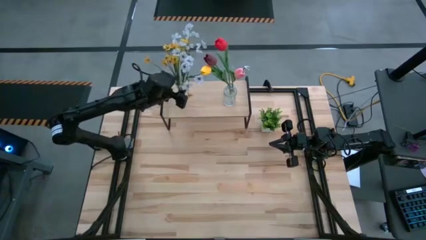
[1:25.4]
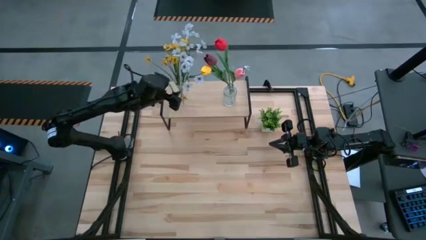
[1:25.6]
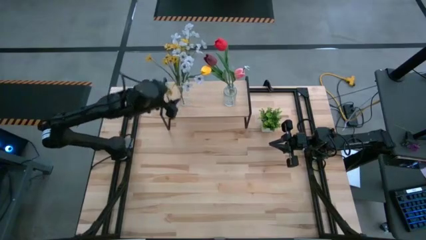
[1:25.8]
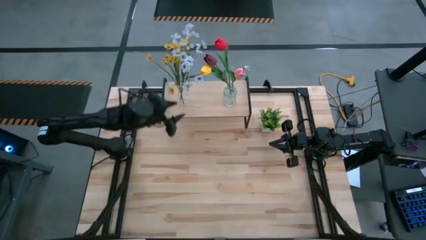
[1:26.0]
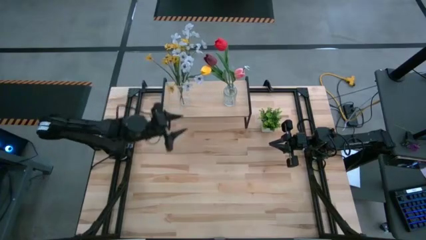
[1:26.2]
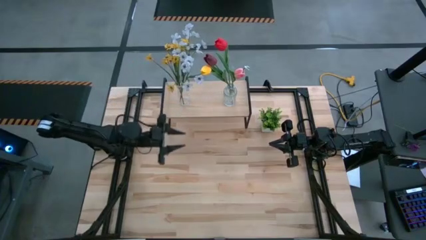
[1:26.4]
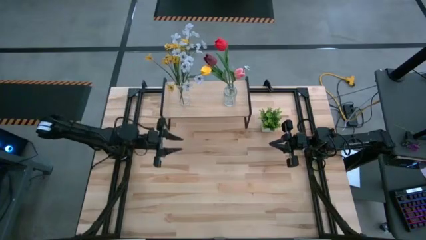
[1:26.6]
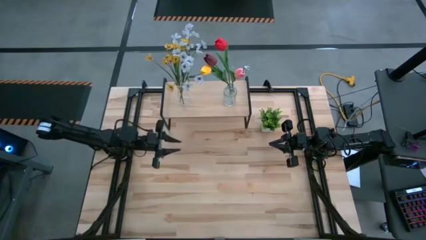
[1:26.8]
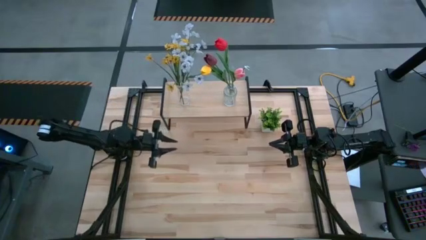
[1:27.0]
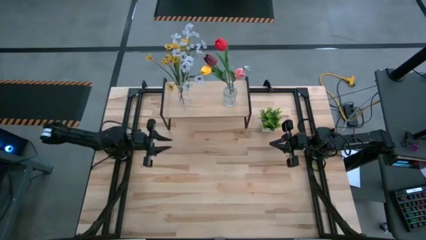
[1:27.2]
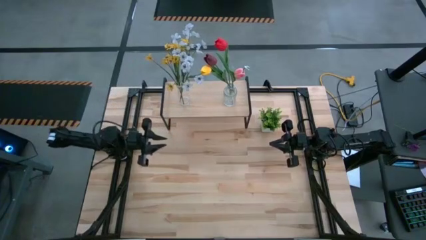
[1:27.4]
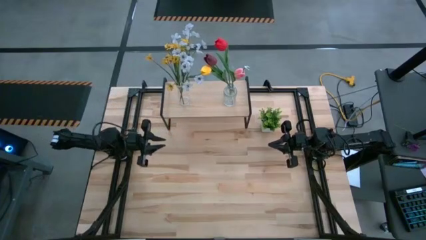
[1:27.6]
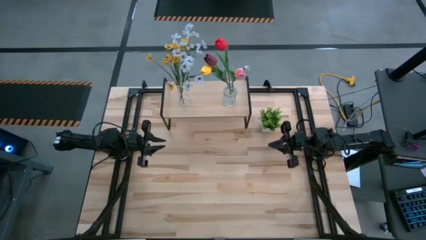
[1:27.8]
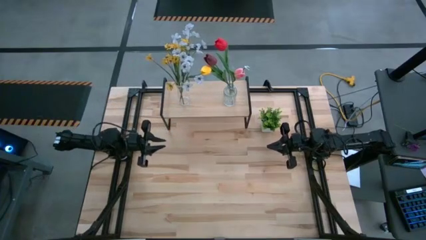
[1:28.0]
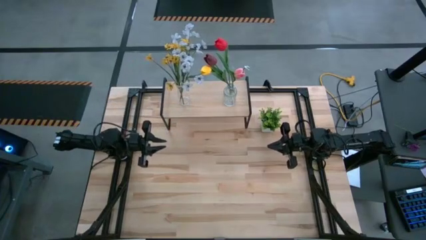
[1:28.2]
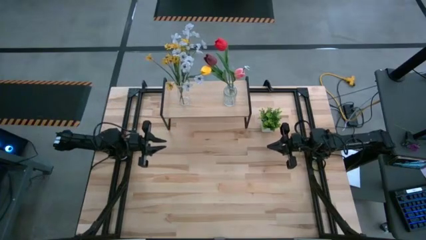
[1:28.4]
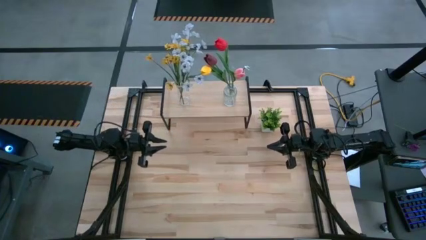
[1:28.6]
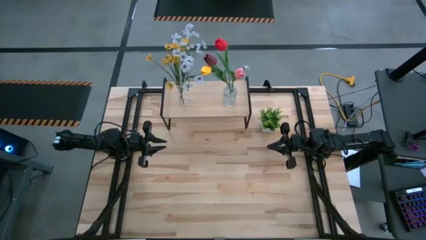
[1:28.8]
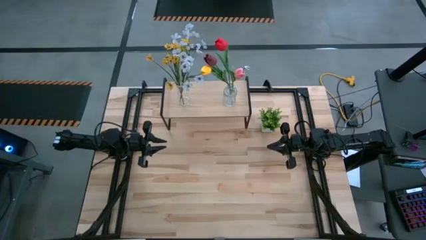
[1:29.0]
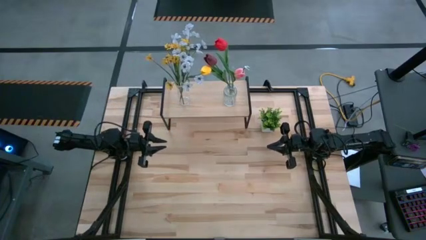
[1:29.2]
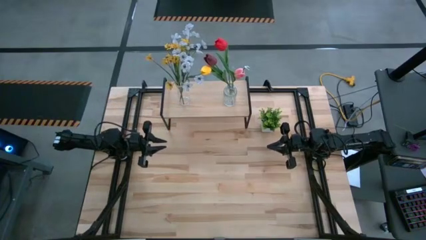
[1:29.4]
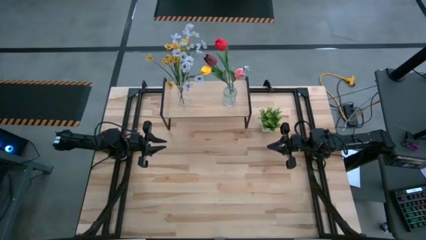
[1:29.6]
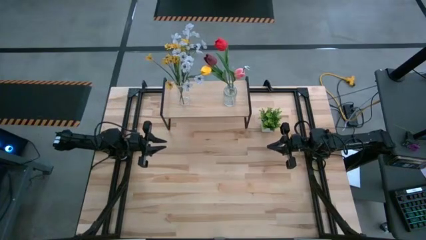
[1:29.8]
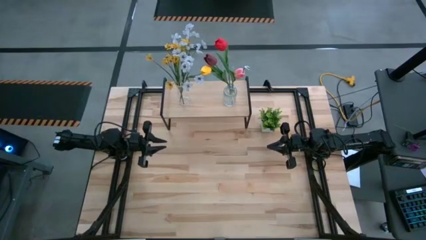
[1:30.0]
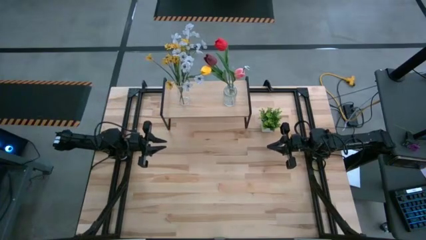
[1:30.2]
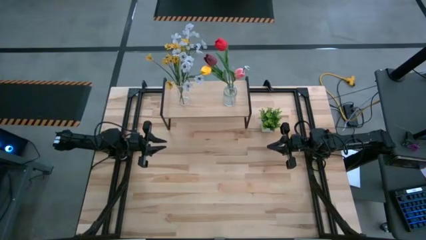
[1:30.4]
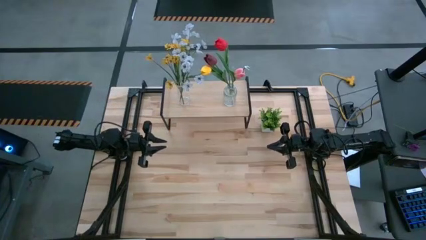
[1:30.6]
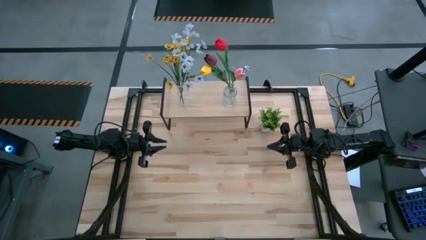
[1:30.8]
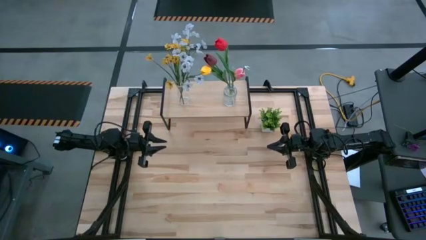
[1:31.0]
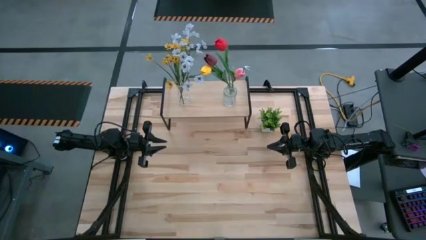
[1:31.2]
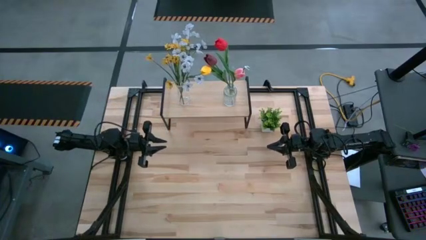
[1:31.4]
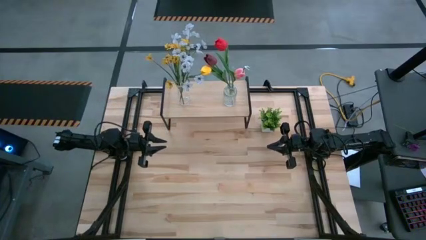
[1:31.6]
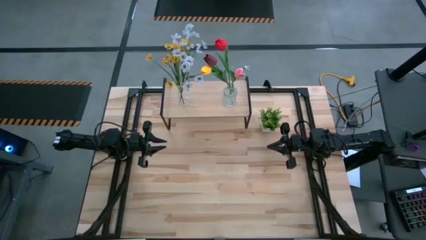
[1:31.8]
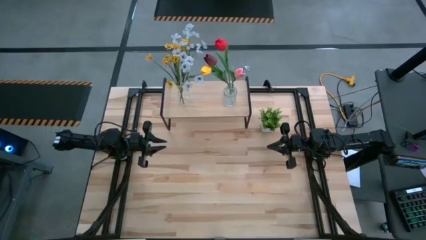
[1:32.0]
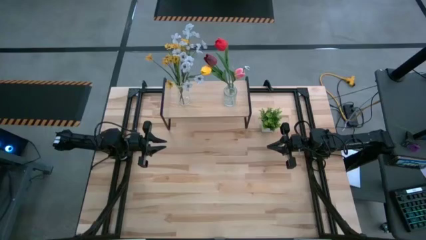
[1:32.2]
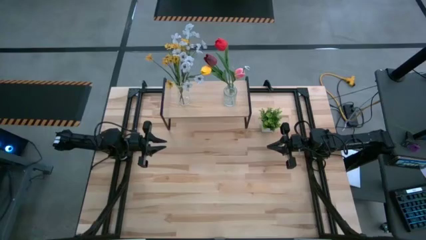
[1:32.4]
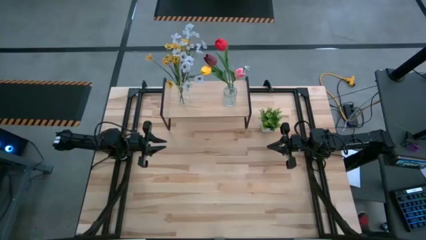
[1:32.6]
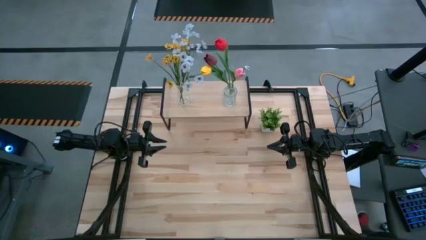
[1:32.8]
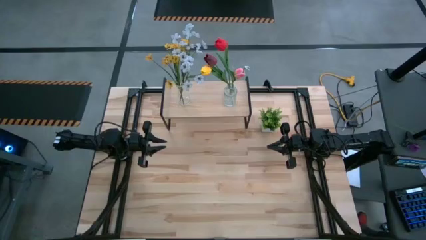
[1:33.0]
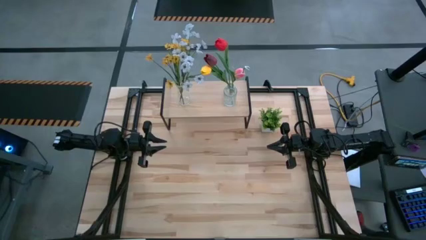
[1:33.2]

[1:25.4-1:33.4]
Task: Pick and place flowers into a vace then onto a shelf
Return to Home Position

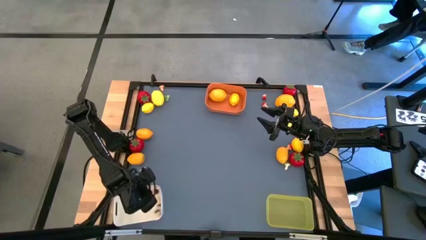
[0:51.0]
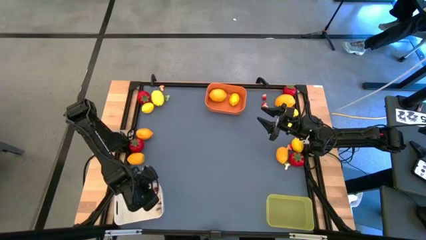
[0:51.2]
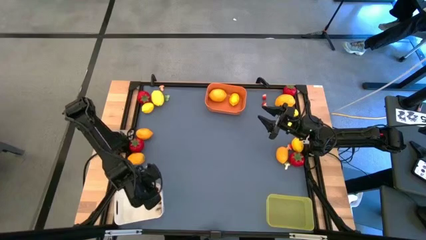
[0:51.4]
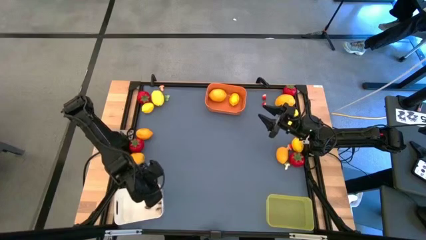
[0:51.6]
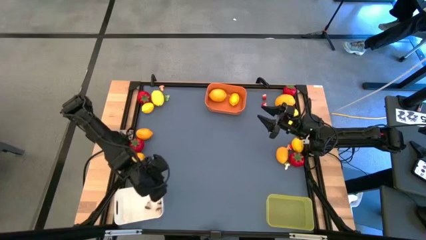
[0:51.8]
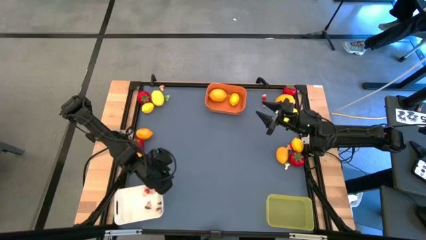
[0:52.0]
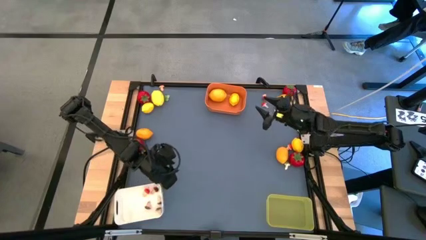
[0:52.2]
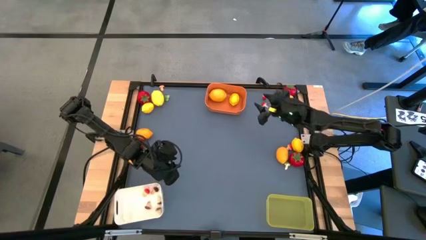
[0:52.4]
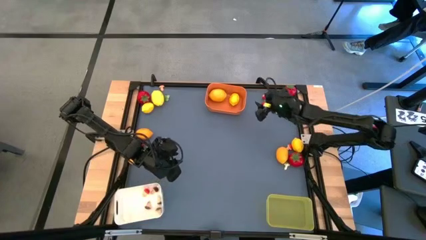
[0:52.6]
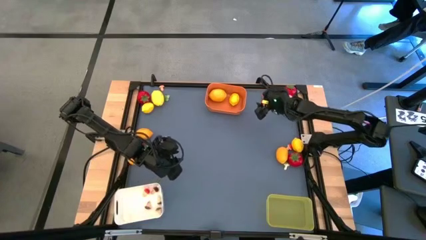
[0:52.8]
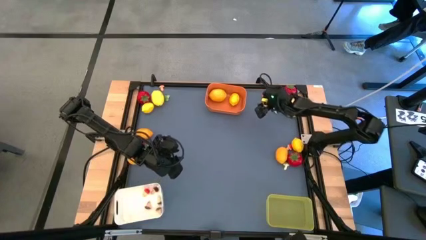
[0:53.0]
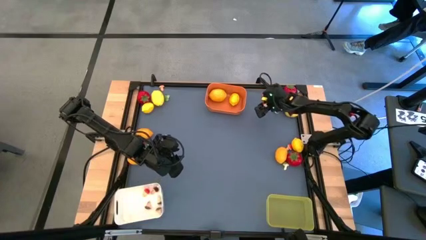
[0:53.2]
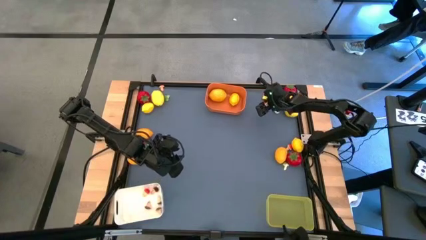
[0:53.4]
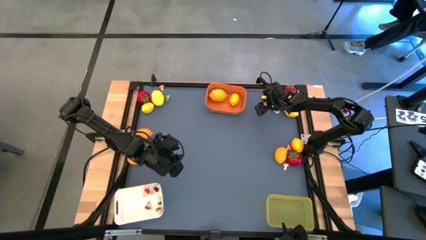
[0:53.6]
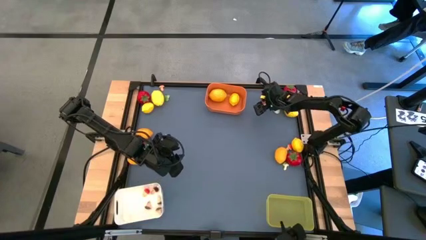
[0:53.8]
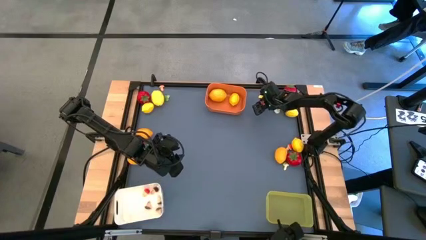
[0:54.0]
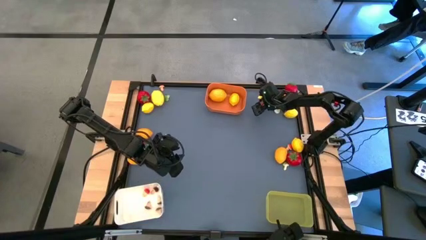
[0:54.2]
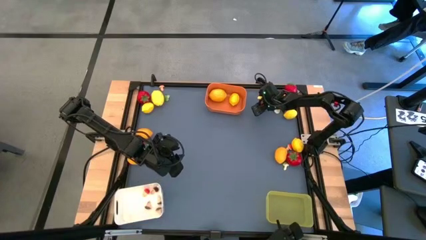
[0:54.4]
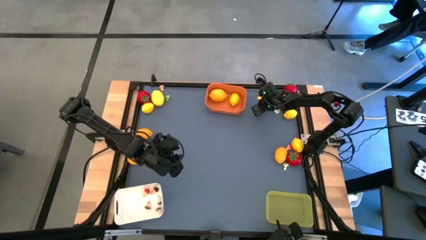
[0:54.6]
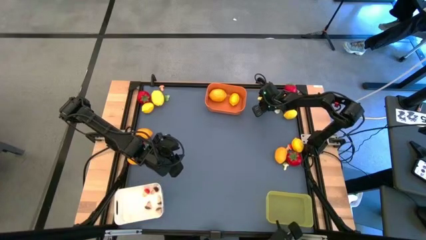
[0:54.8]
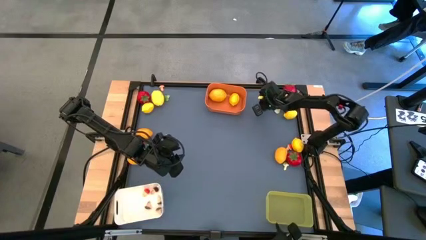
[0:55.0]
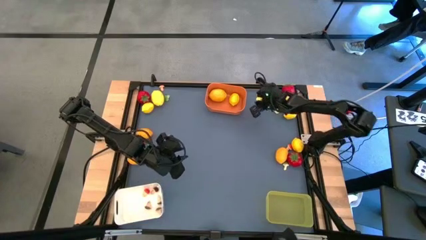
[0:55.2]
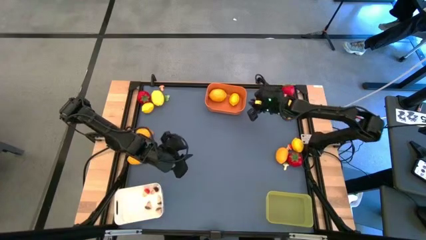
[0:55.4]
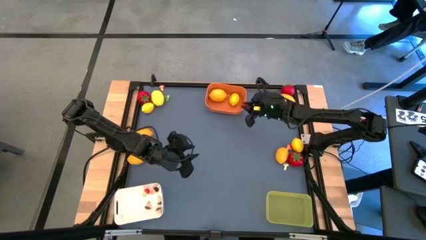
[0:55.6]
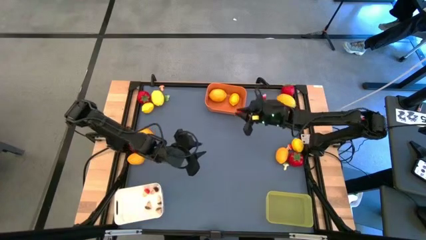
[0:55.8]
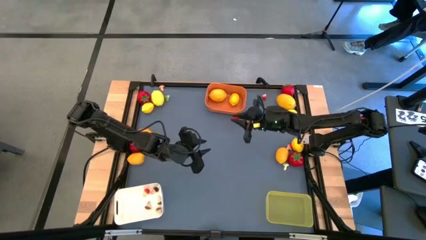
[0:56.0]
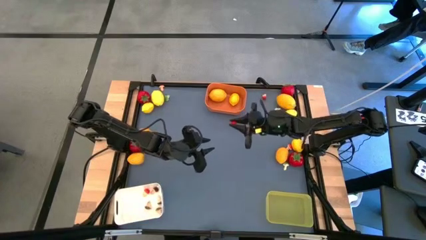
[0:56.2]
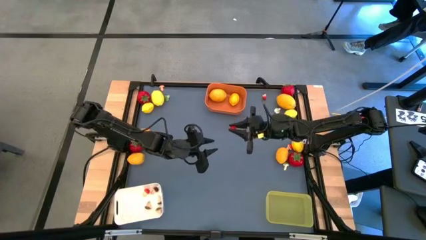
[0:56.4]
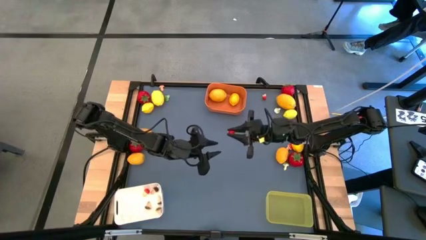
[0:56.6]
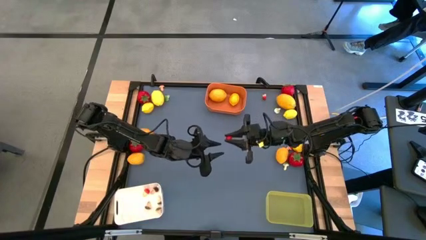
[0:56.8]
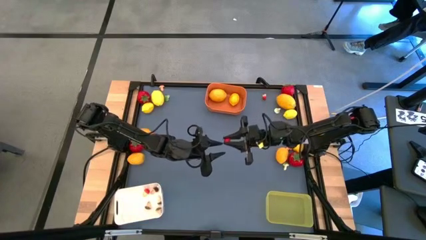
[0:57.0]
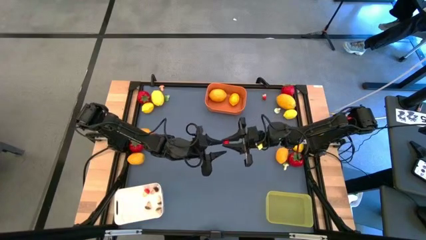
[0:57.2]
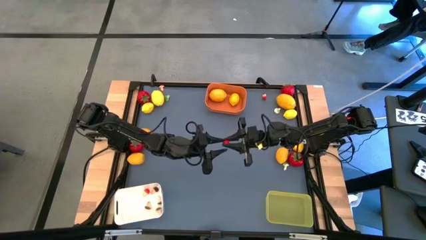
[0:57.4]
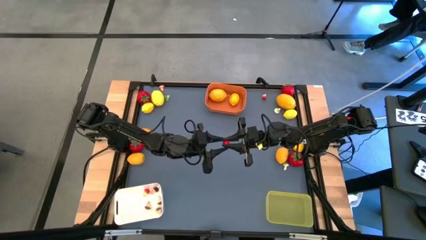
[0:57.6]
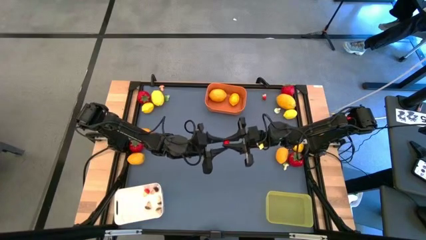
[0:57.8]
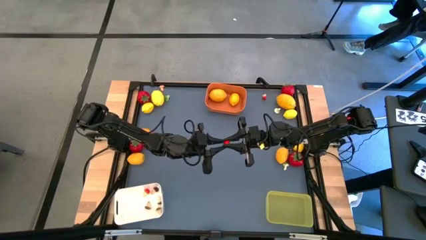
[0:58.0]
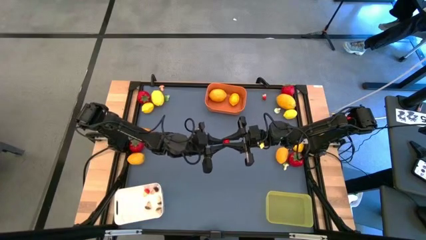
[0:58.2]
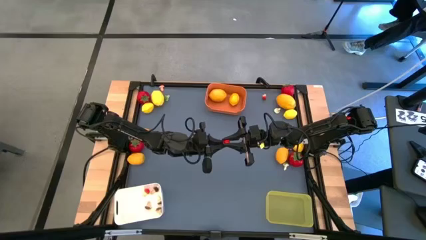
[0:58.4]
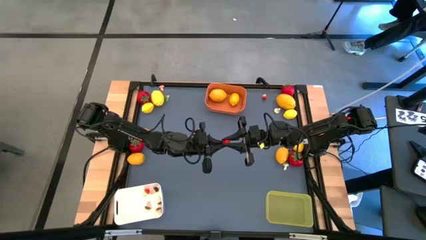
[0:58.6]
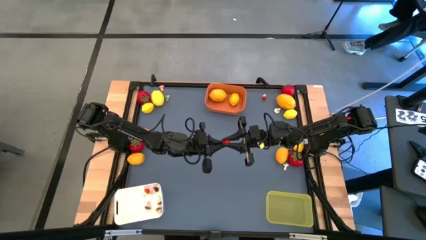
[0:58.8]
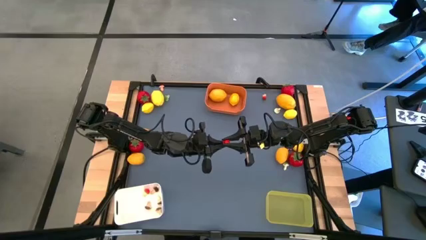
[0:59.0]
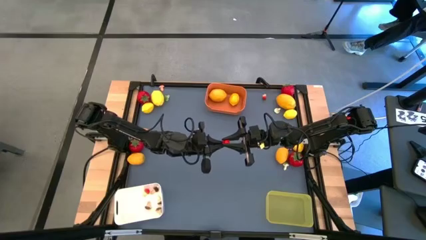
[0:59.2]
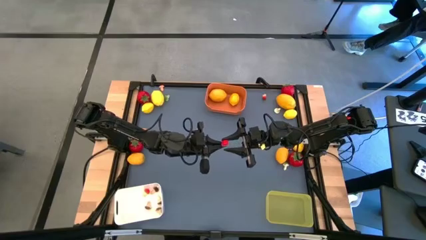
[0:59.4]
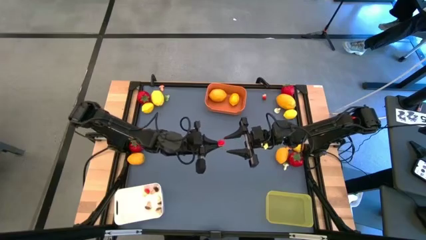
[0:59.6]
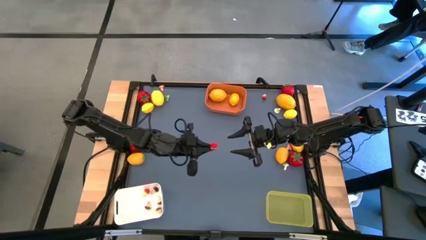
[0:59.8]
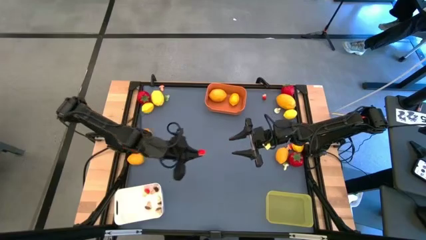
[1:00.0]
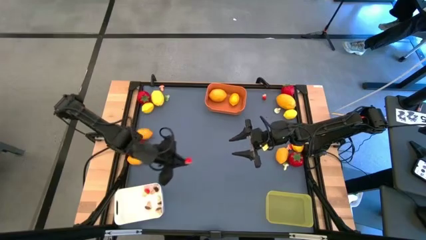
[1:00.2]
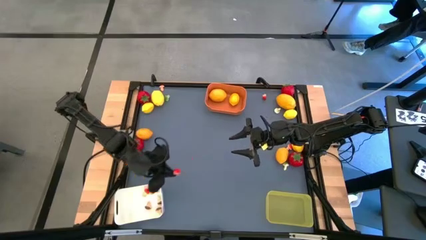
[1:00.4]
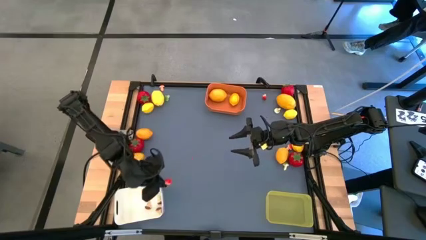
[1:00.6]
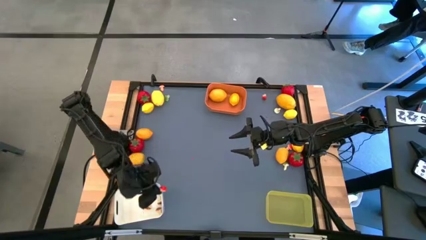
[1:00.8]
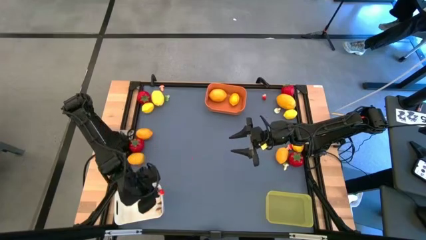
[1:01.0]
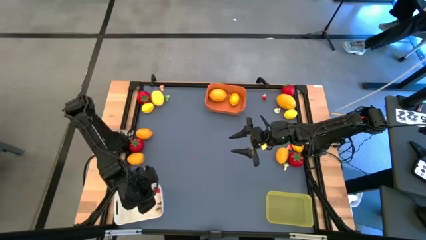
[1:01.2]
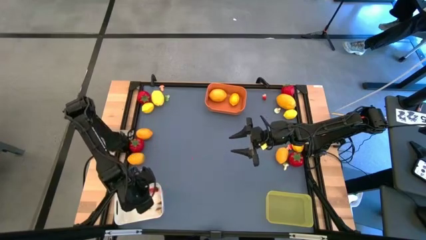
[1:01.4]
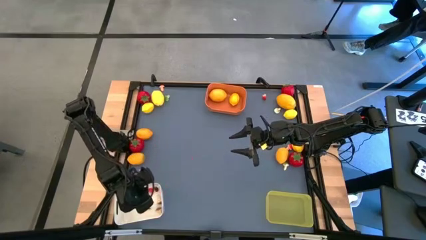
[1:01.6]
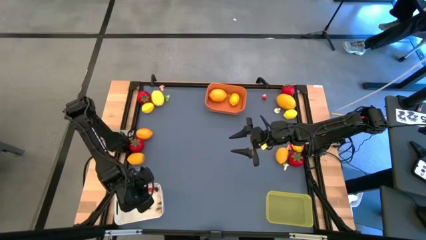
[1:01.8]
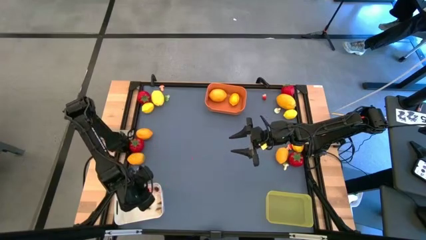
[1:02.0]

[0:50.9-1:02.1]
Task: Sort produce into baskets
Put the red mushroom into the white bin
